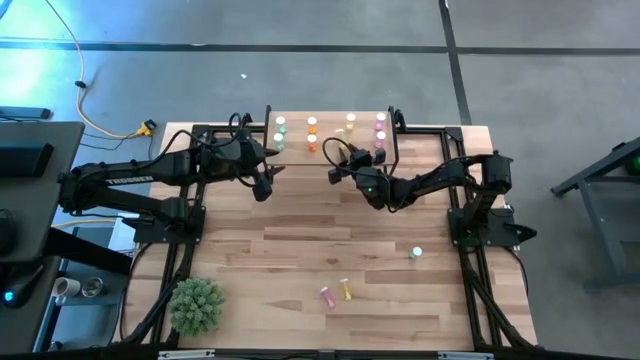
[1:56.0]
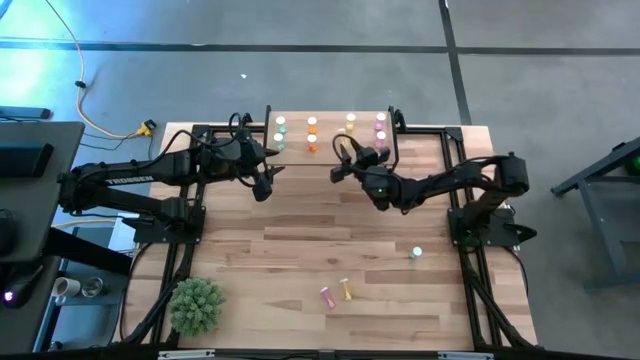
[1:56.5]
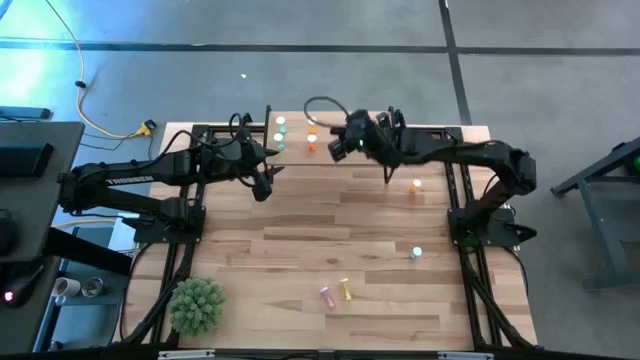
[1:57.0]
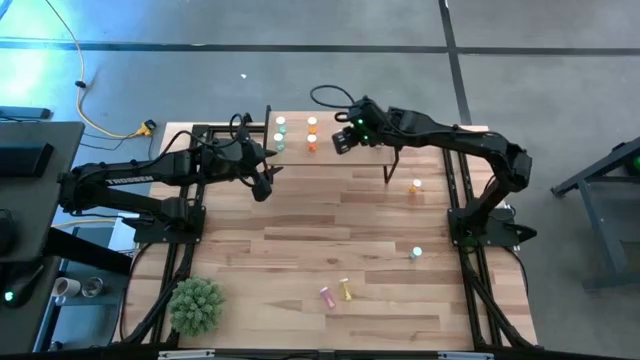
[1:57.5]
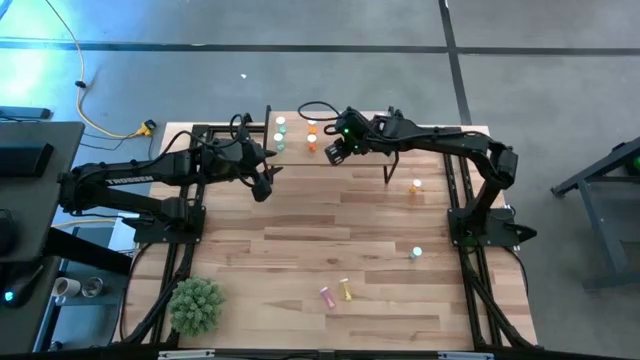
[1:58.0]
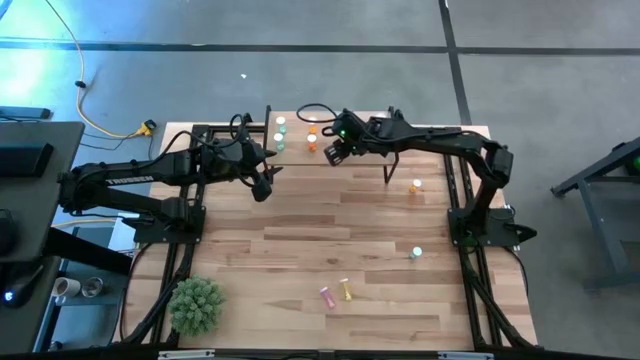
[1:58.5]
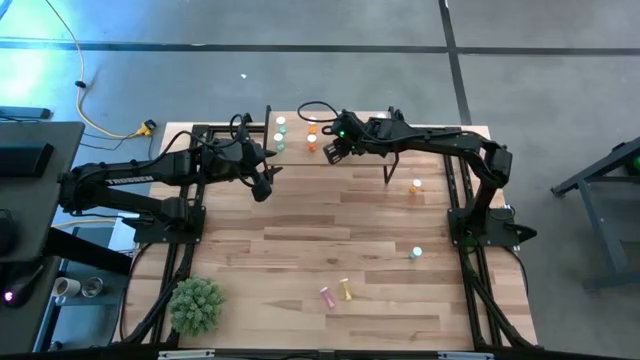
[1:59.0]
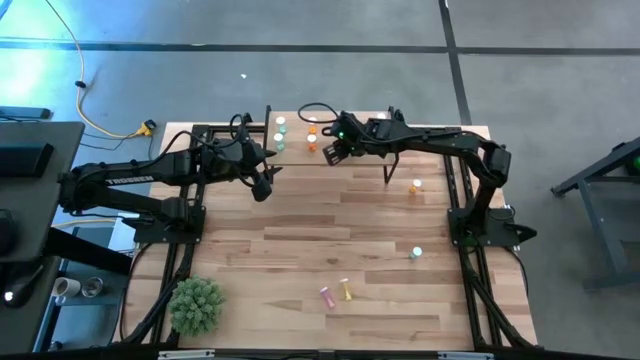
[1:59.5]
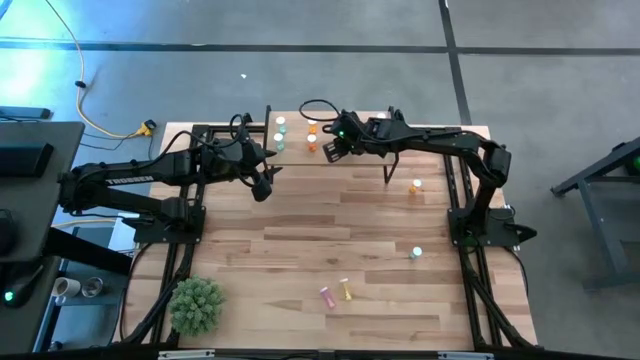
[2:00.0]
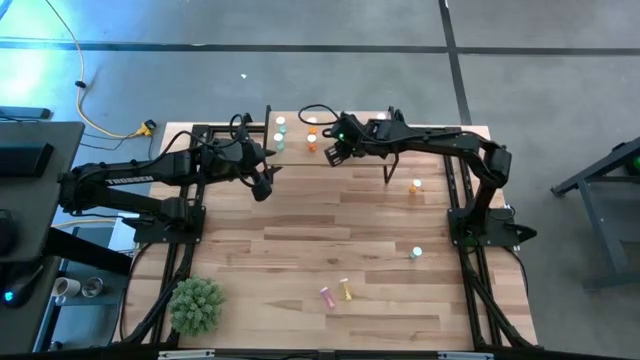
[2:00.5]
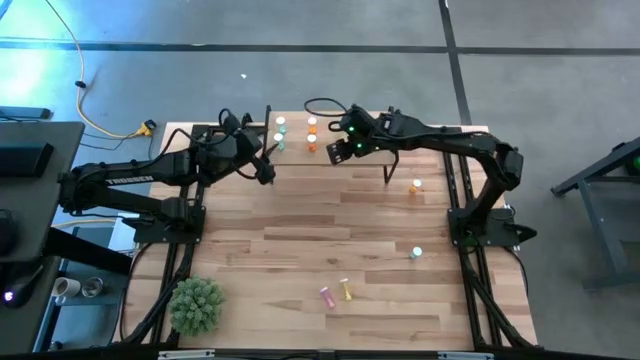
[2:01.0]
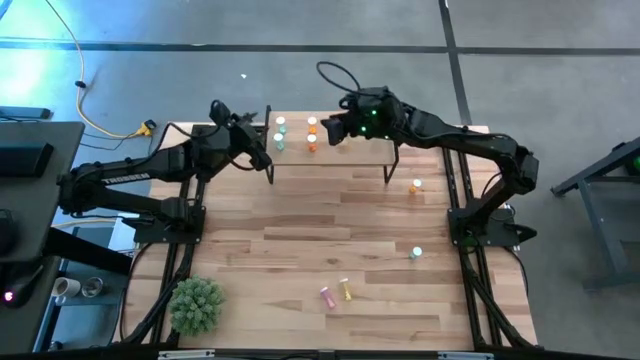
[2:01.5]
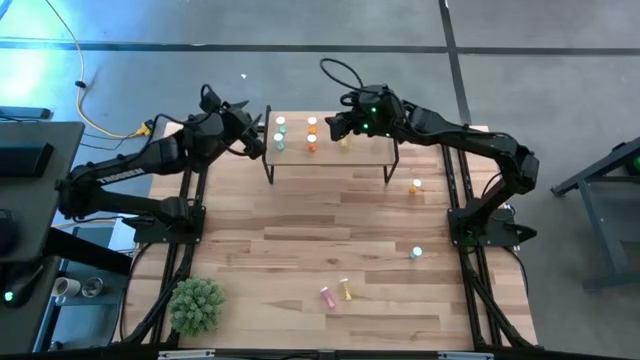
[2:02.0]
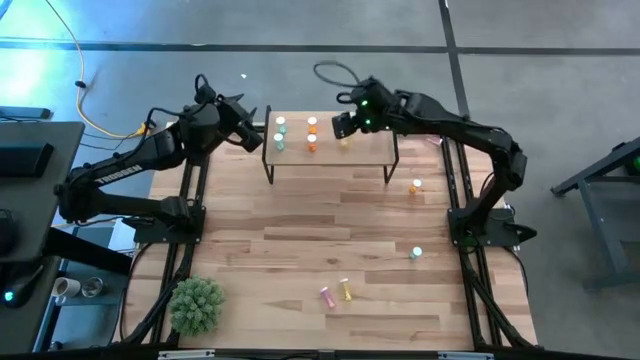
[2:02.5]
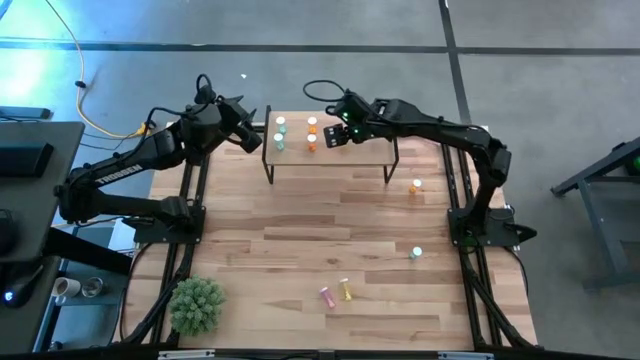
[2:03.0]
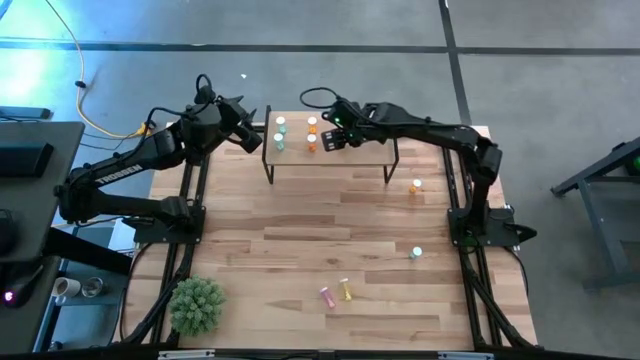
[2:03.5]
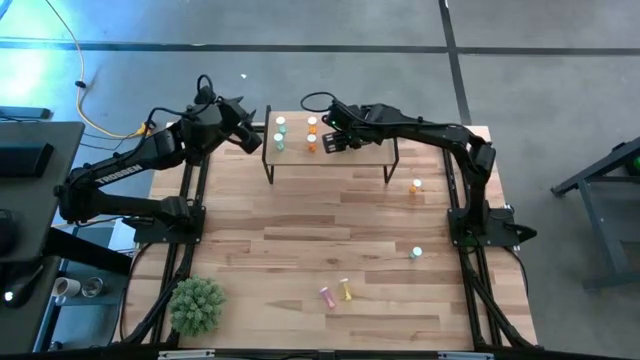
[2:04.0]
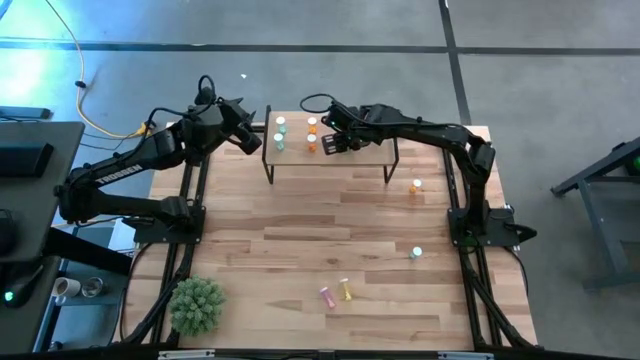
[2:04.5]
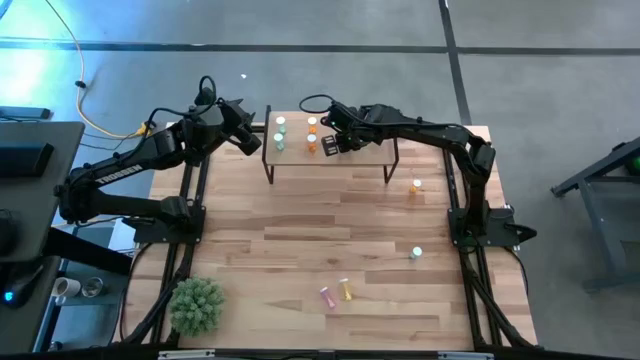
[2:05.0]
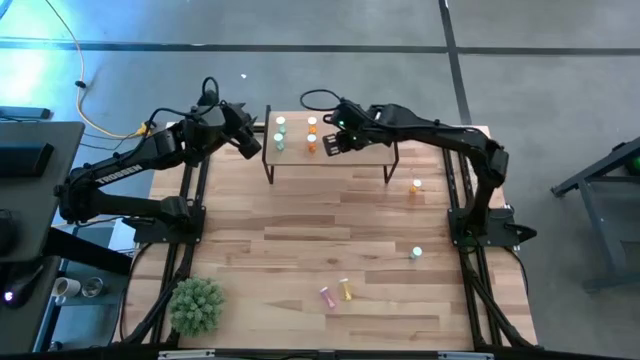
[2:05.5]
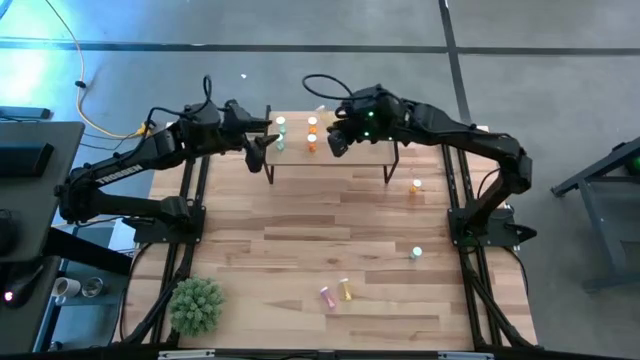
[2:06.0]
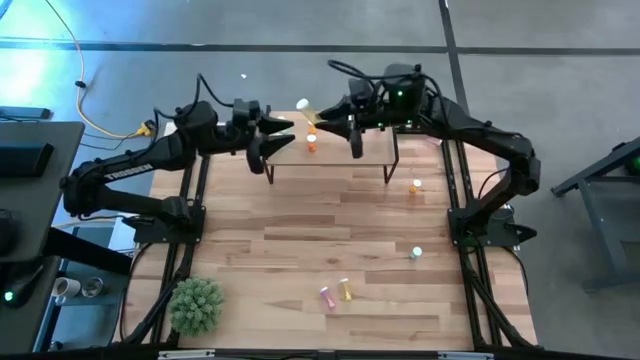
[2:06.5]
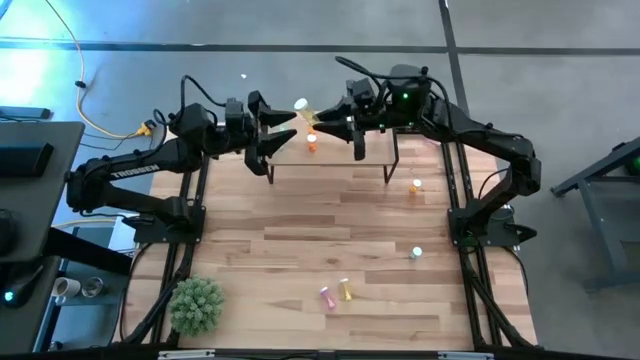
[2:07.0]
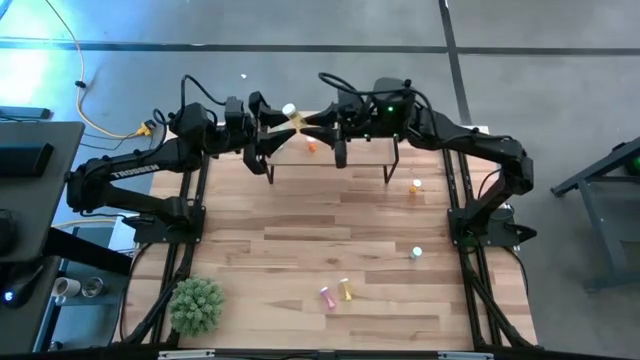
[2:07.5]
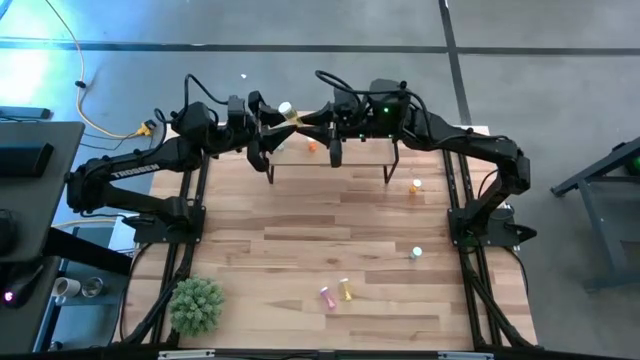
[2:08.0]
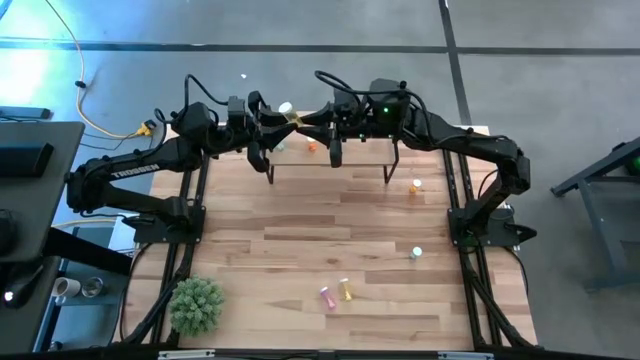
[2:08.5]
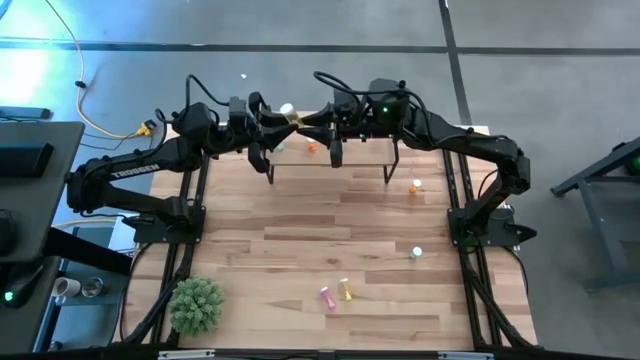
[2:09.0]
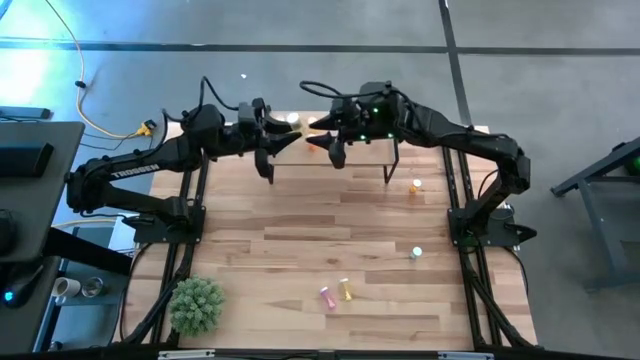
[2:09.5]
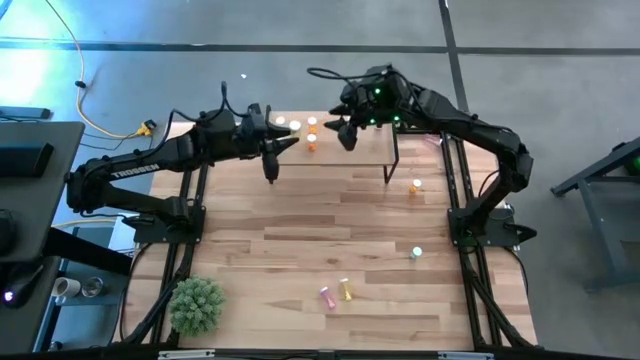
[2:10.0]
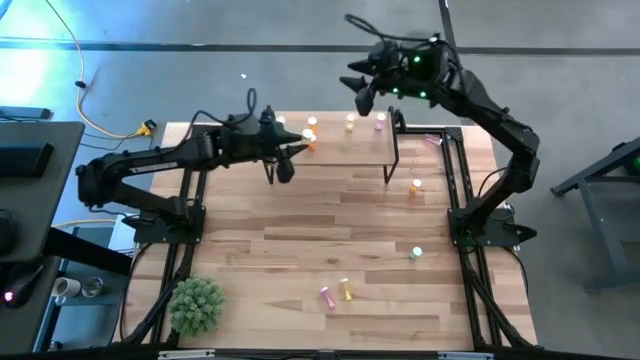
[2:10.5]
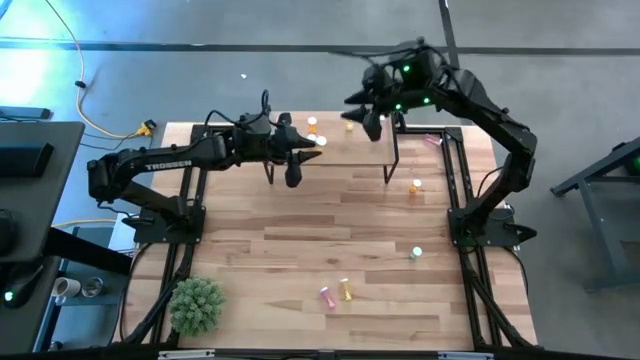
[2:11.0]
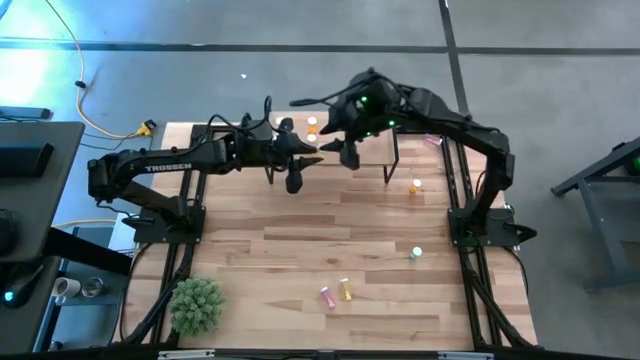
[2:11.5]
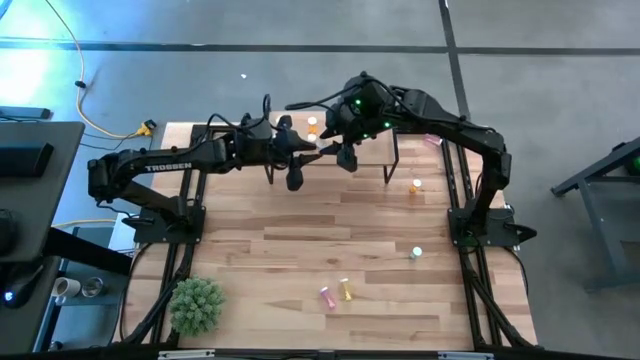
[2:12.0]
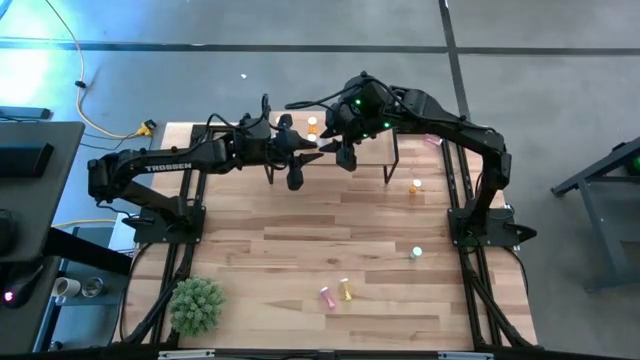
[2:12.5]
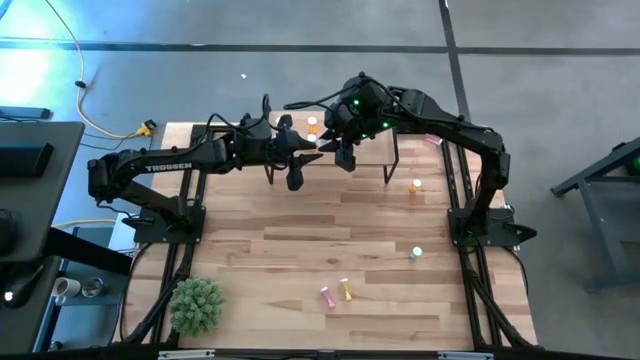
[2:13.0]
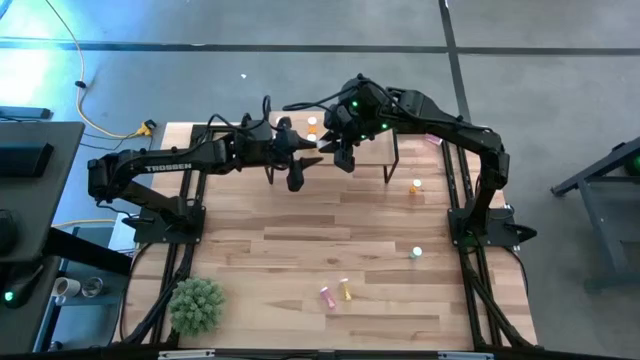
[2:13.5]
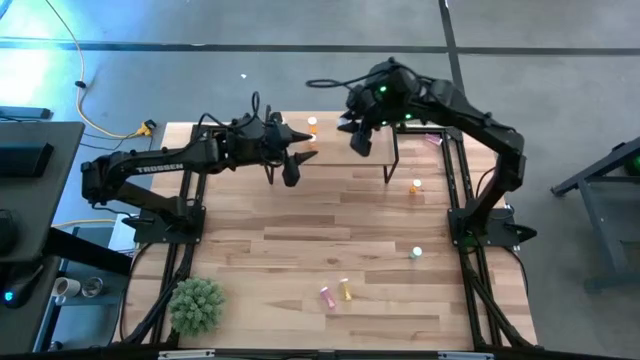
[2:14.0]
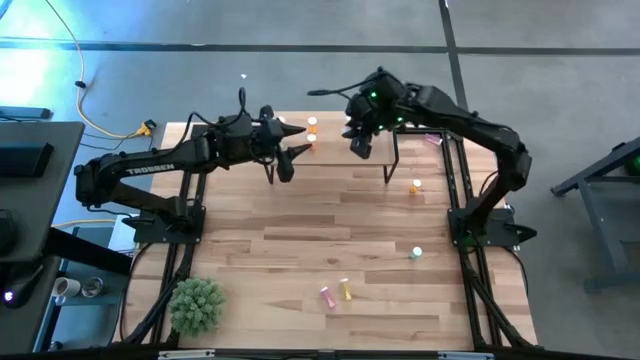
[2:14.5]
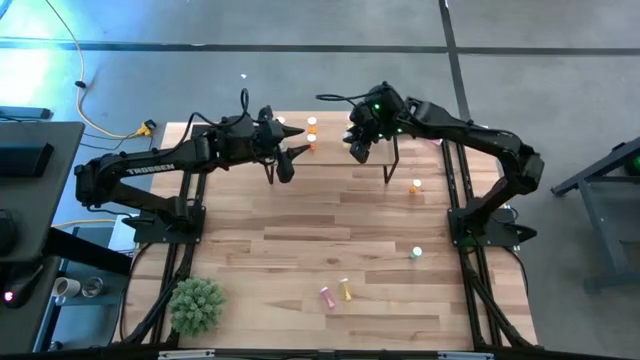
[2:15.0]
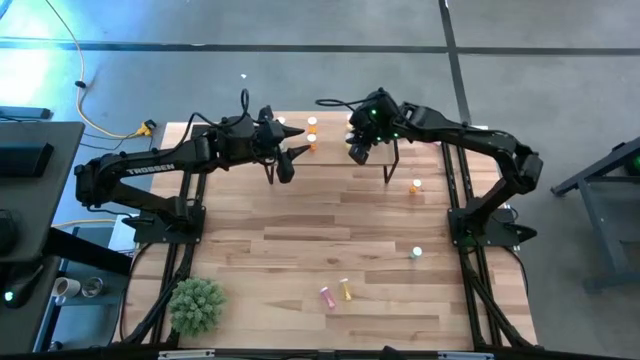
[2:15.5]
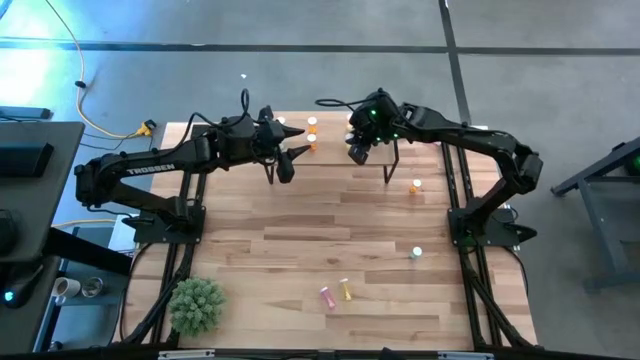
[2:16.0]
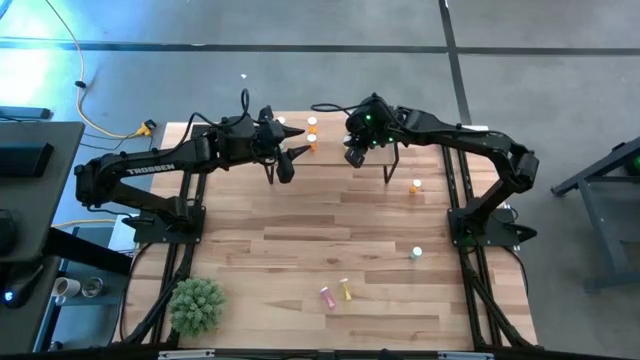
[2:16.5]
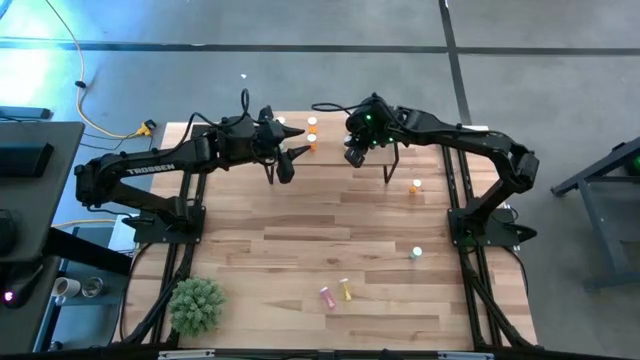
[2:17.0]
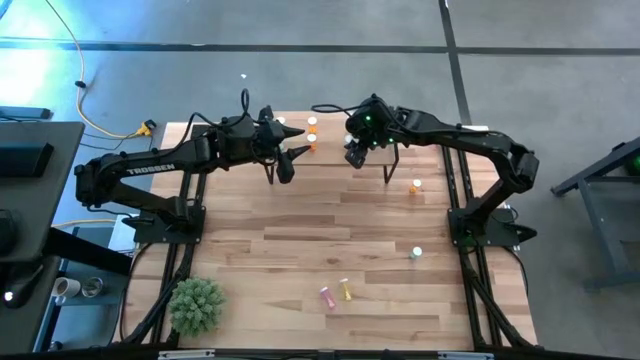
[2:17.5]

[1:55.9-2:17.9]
Task: Pick and place medicine bottles onto shelf by color
Put the top yellow pill bottle on the shelf aligned with the other yellow pill bottle
